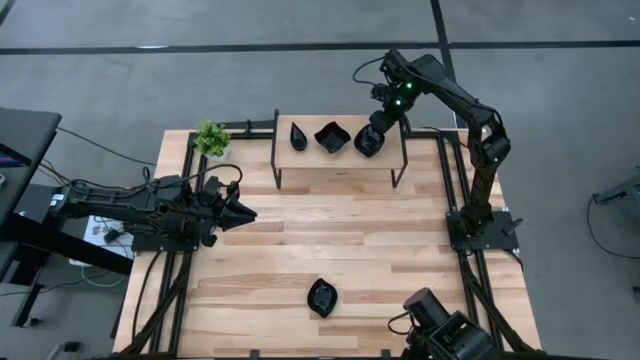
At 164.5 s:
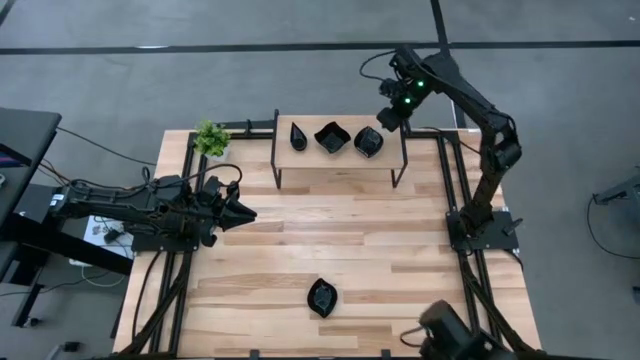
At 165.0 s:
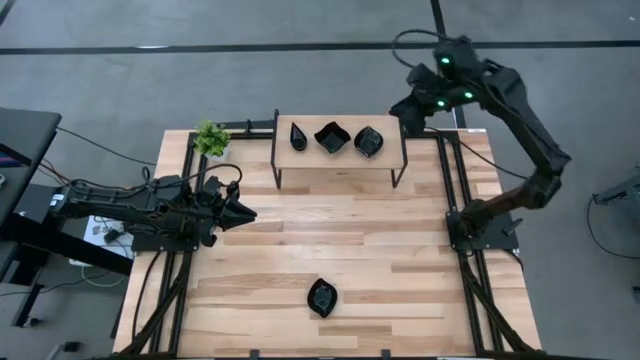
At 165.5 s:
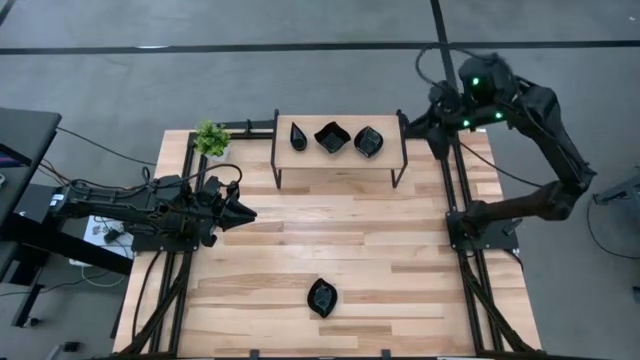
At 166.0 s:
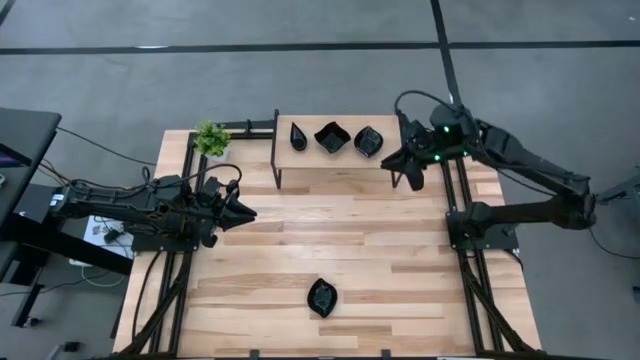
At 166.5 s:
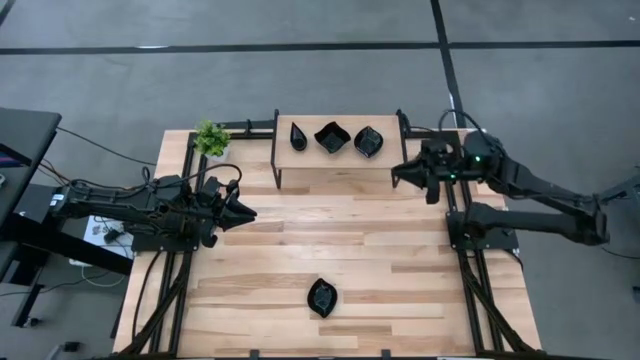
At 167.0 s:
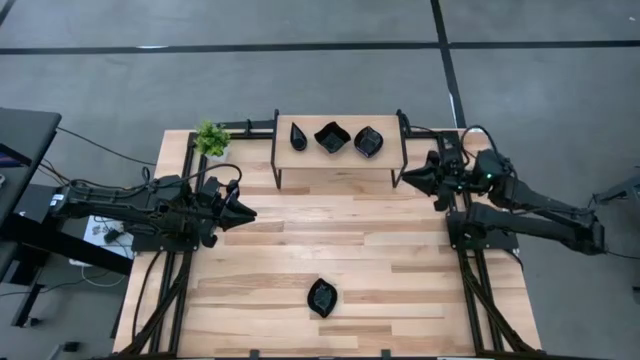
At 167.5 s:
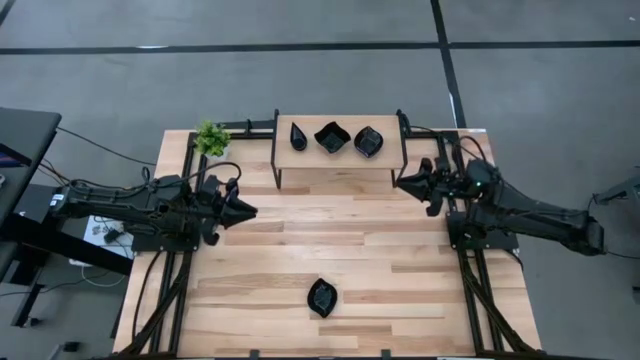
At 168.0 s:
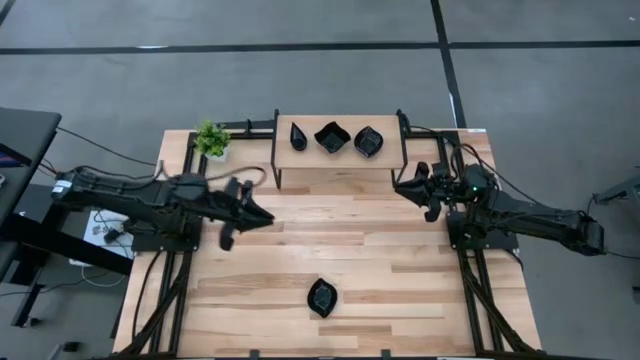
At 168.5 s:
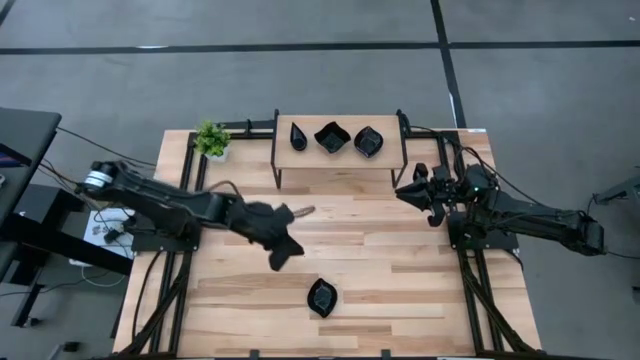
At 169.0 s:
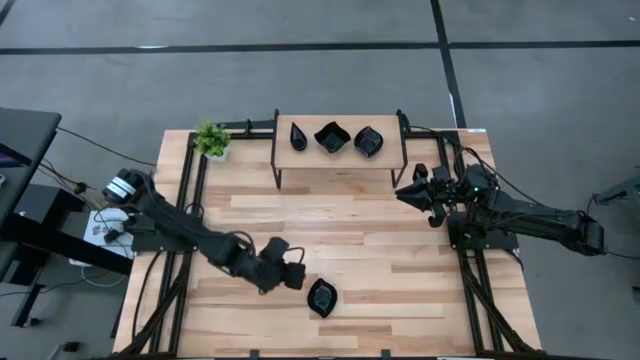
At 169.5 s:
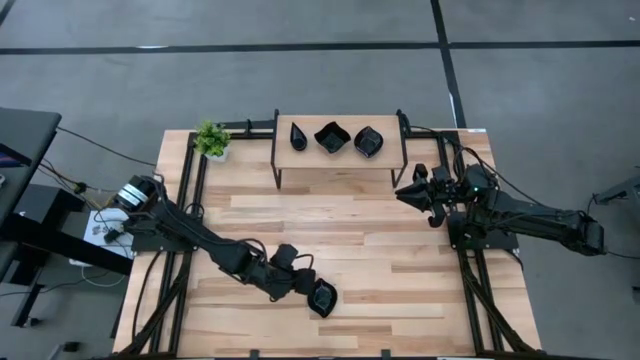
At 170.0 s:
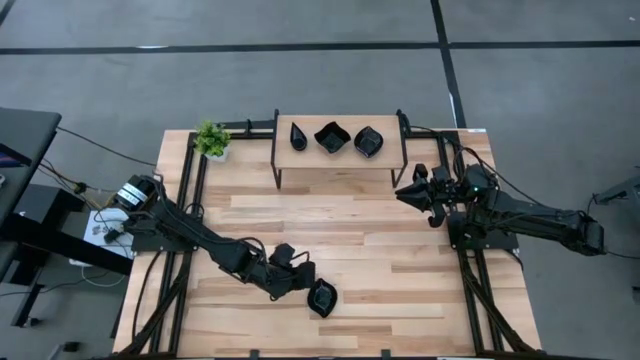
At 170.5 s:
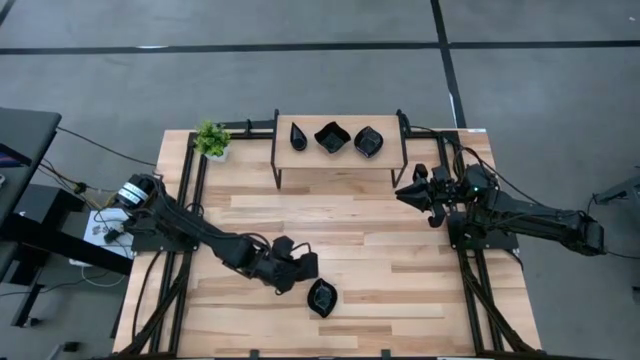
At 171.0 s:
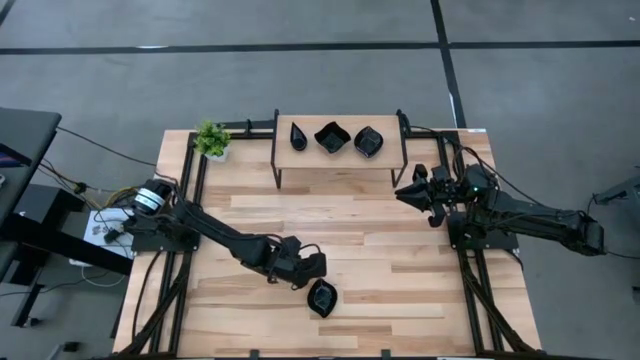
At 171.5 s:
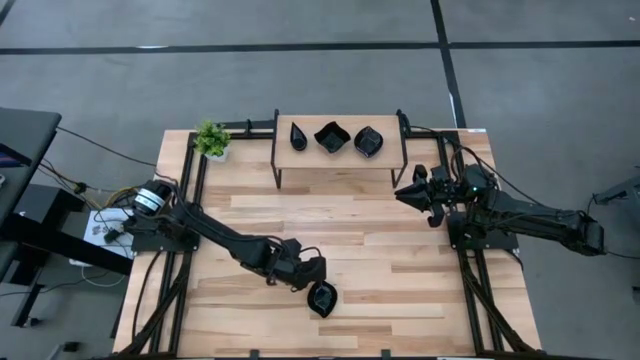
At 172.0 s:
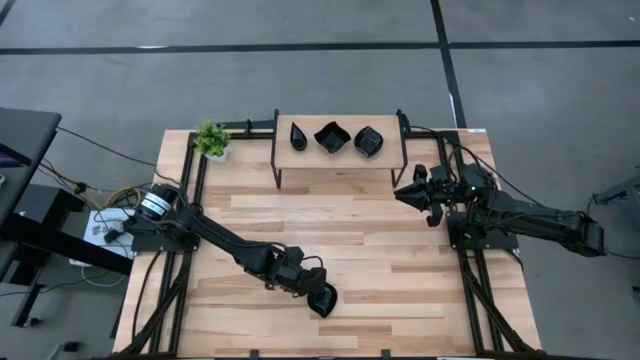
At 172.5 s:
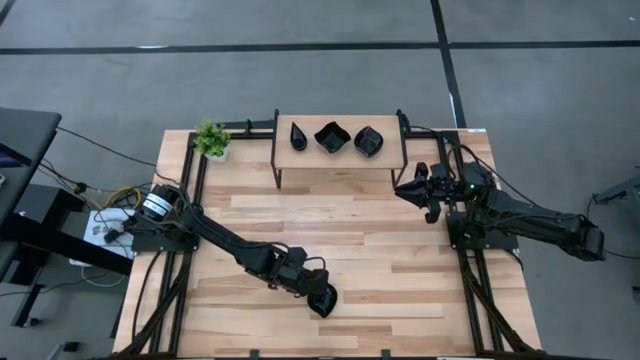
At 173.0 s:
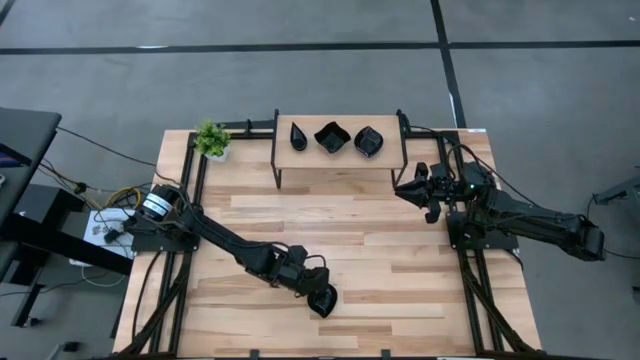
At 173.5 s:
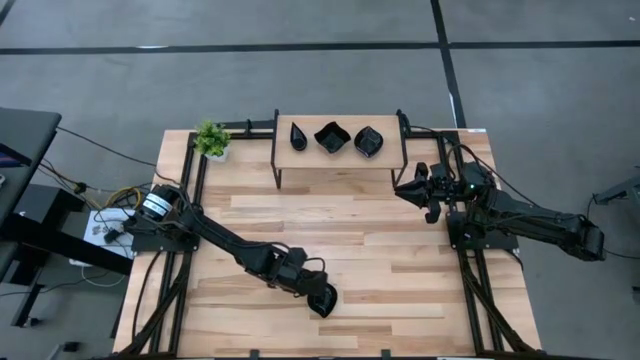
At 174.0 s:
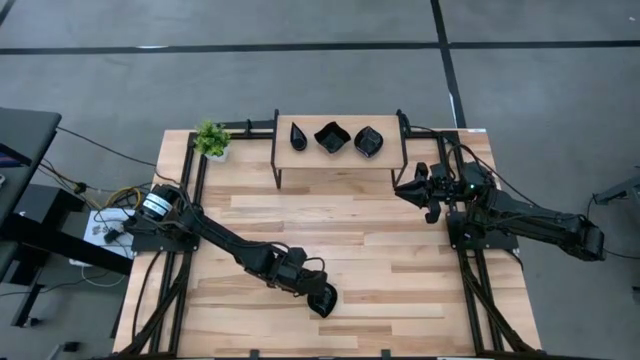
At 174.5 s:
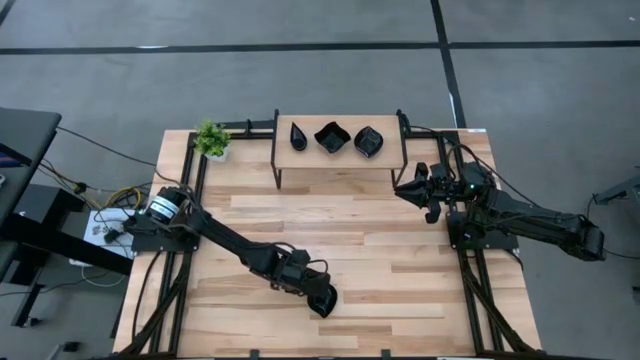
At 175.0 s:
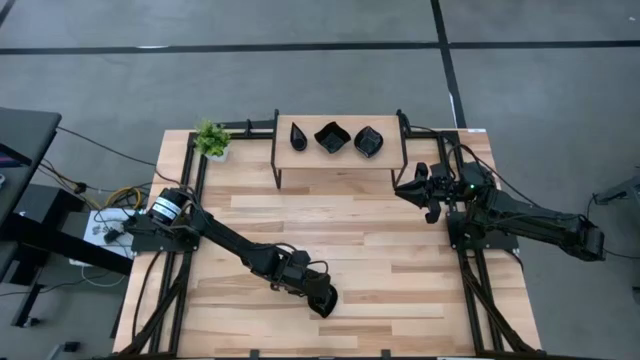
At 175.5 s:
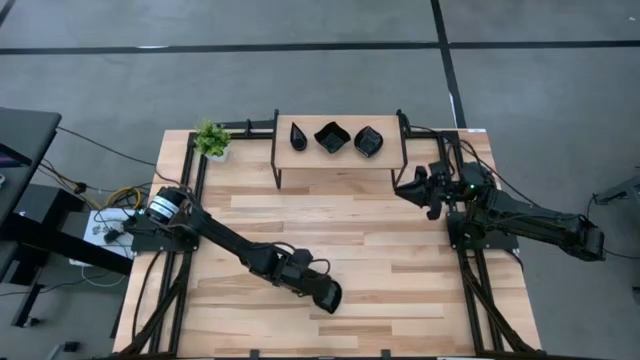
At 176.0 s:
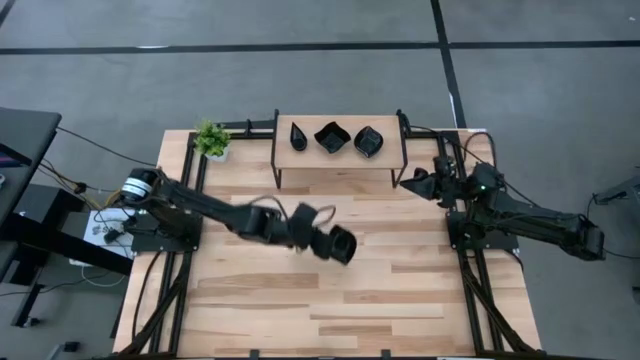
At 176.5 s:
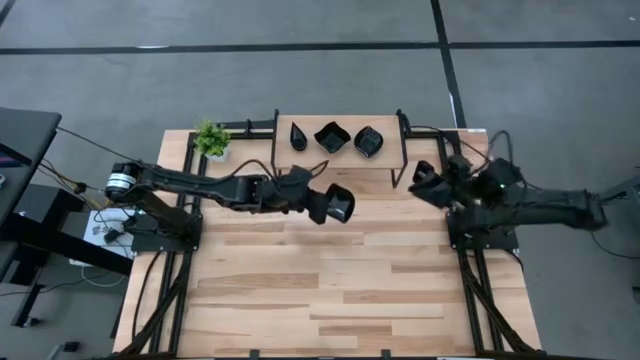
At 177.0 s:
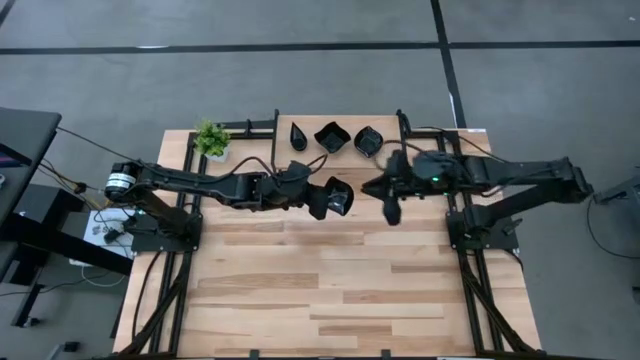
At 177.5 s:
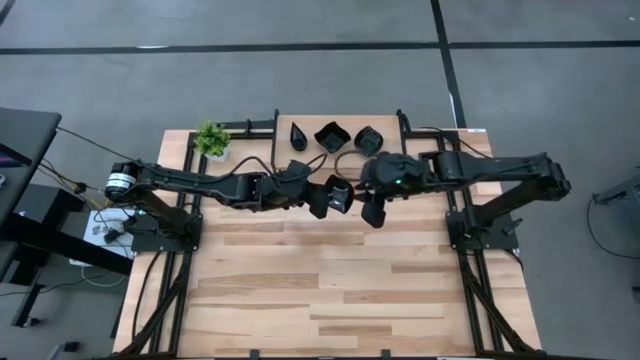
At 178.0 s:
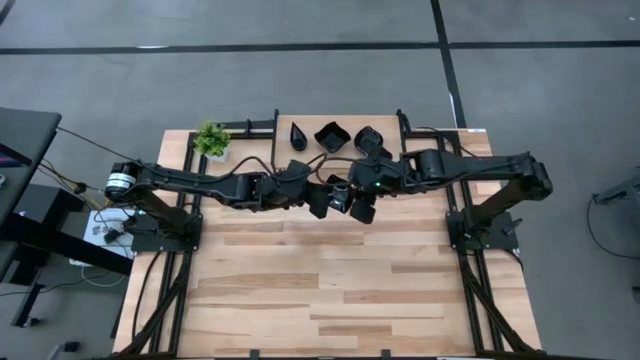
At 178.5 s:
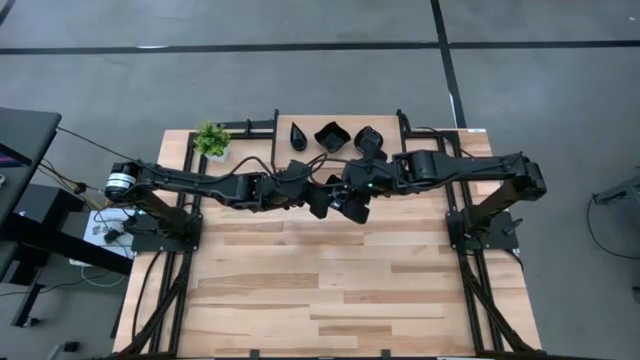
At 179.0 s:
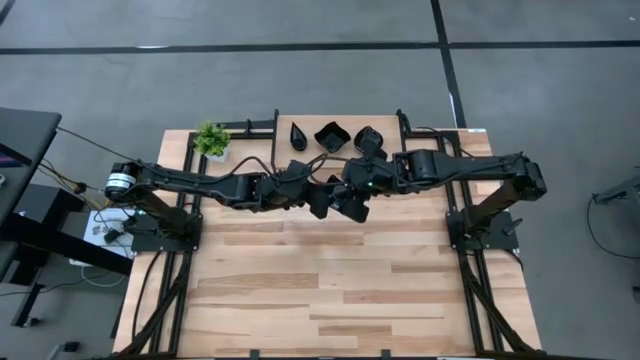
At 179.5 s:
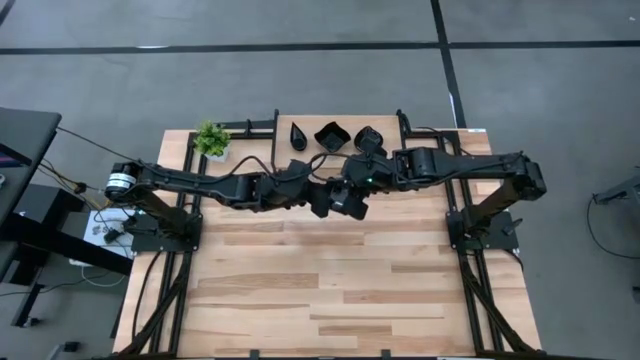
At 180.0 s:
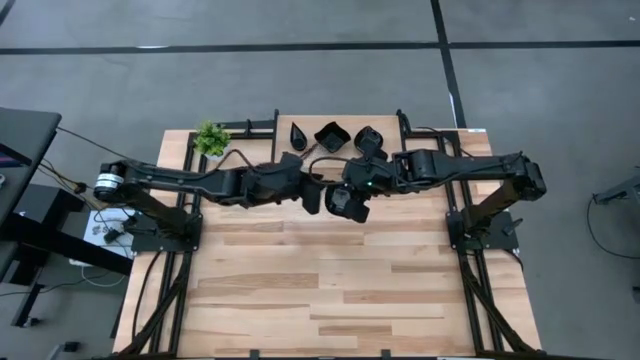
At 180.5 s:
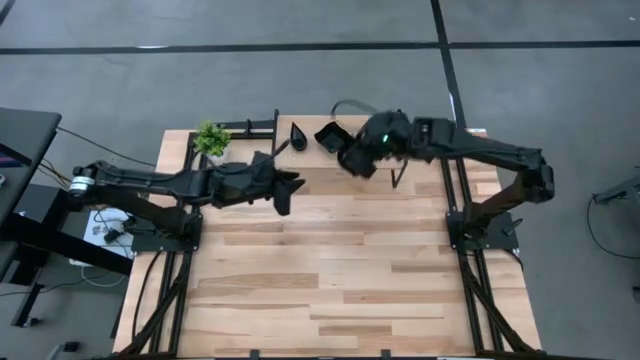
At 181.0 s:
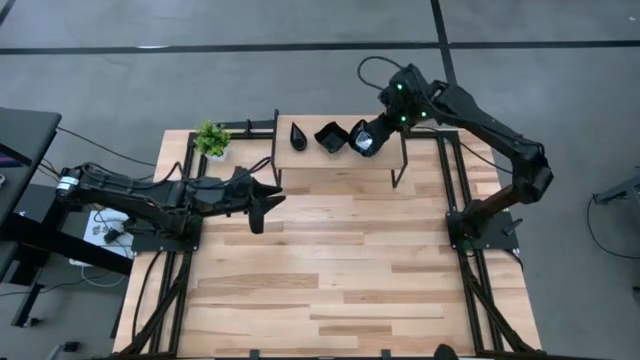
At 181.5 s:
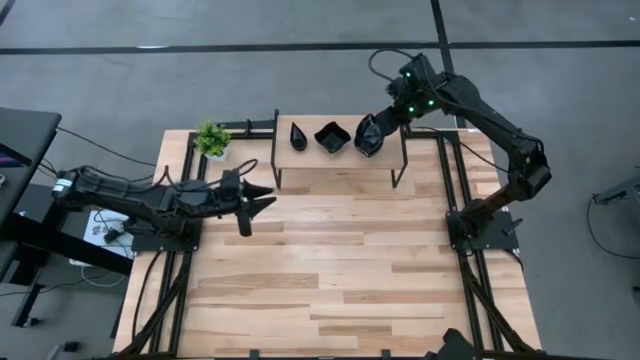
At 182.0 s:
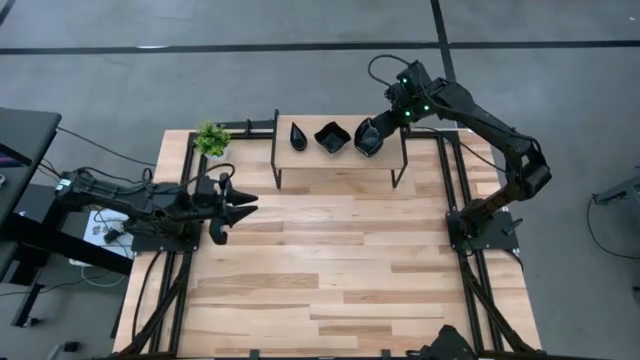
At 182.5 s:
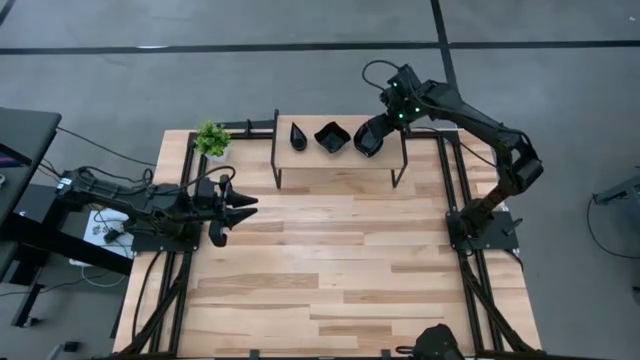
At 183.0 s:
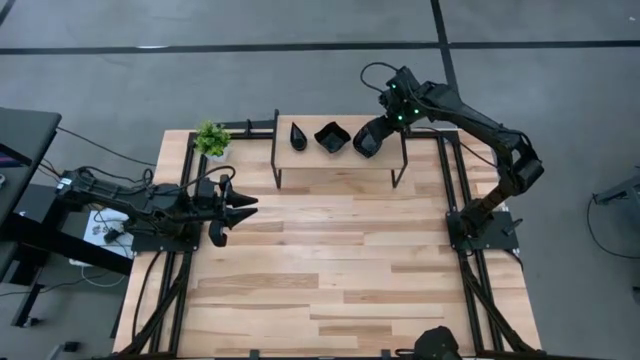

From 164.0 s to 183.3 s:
Task: Pick & Place Mini shaped plates
Stack the leaf shaped plate on top of the leaf shaped plates on the shelf

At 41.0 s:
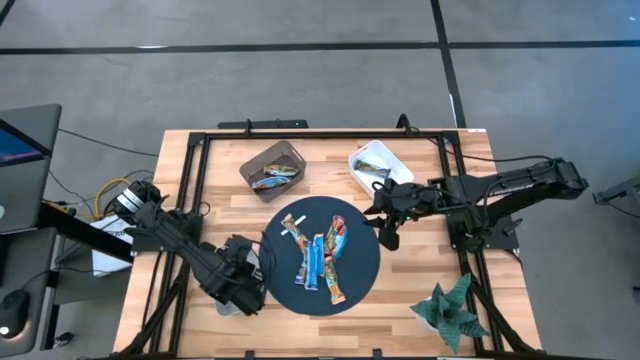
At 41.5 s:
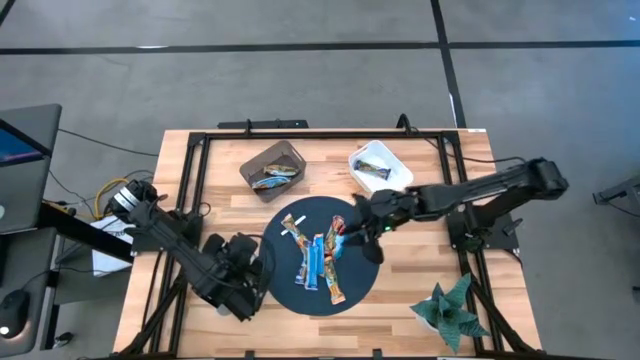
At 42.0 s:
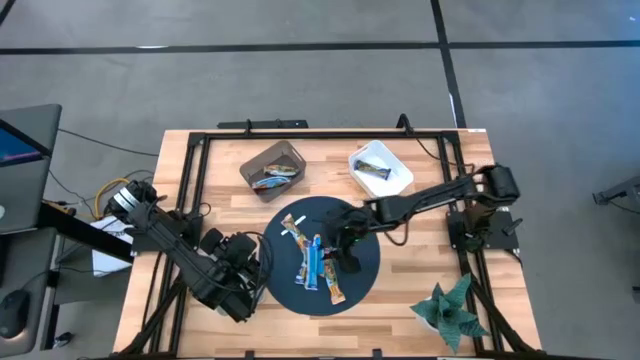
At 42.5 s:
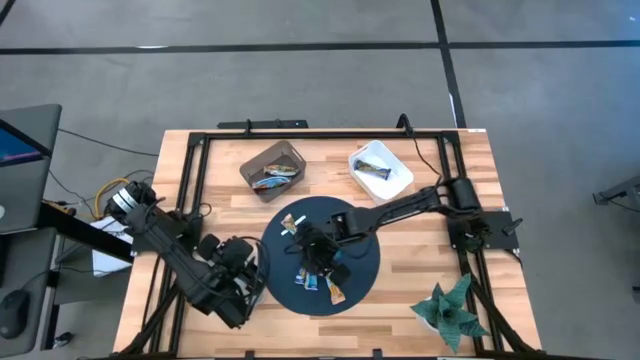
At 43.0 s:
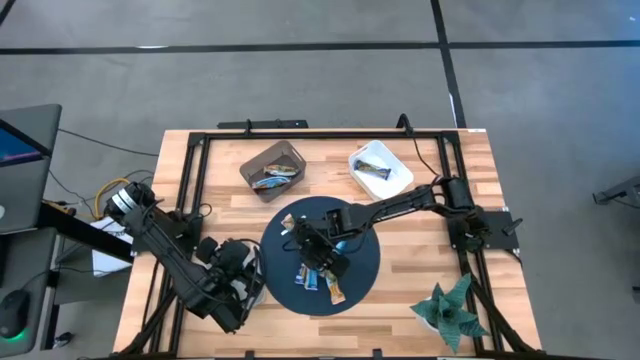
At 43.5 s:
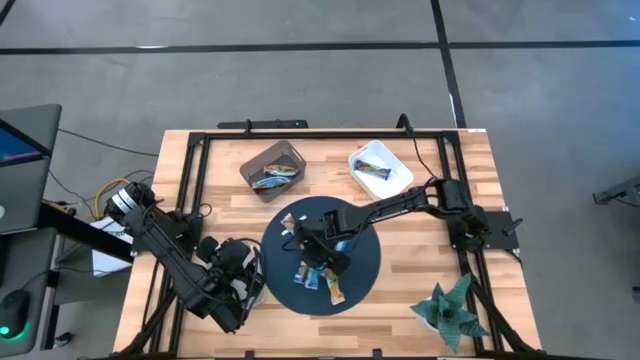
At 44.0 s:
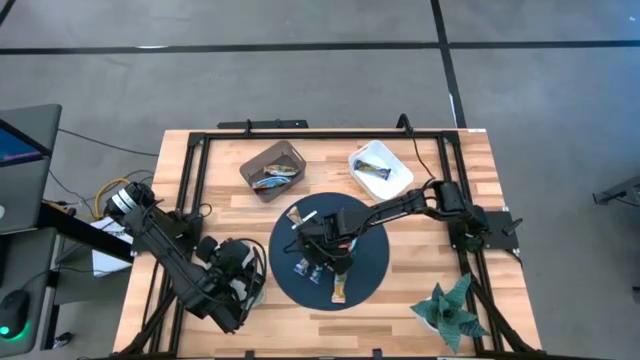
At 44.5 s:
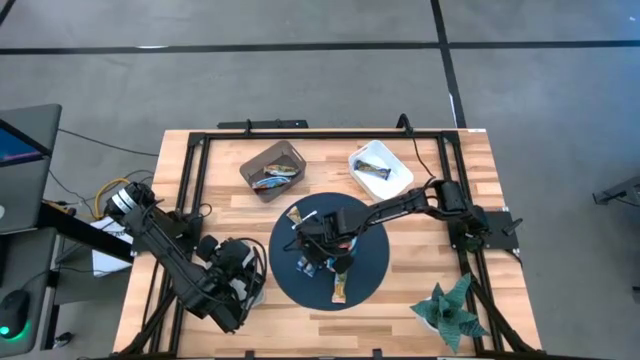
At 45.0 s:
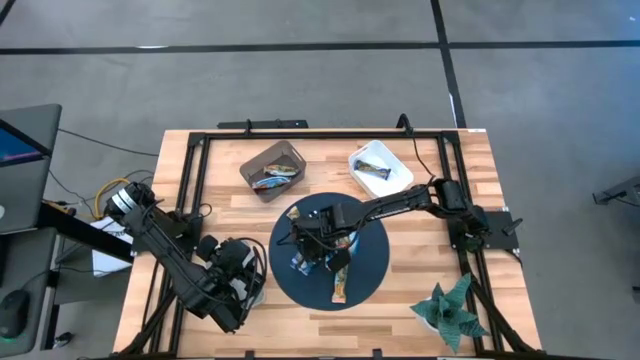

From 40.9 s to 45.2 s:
Task: Pick and place Granola Bars by type
Put the blue granola bar into the white bin
